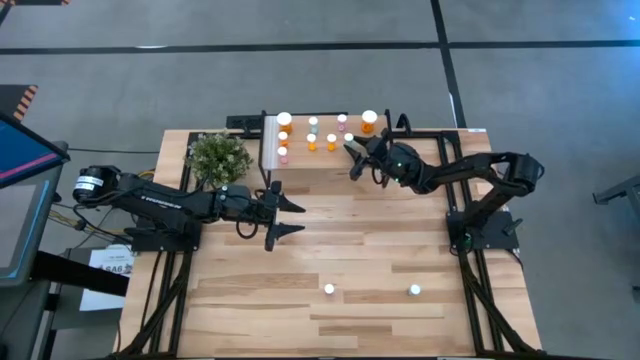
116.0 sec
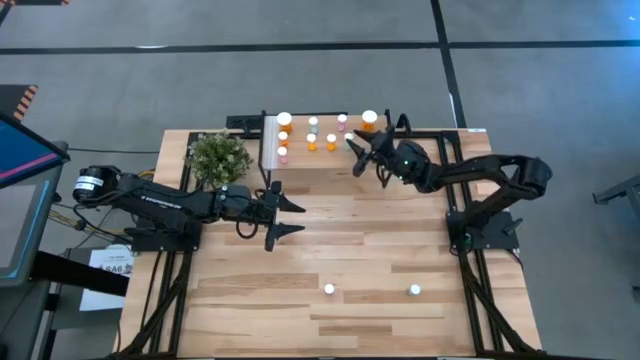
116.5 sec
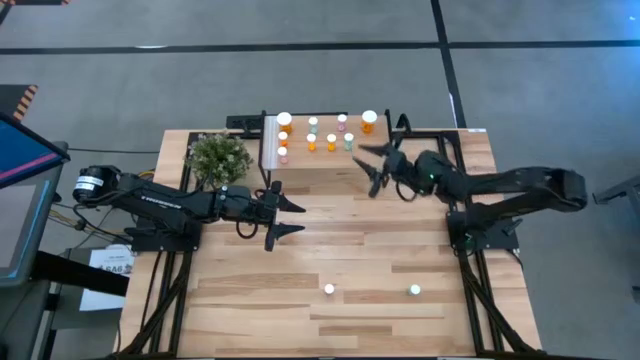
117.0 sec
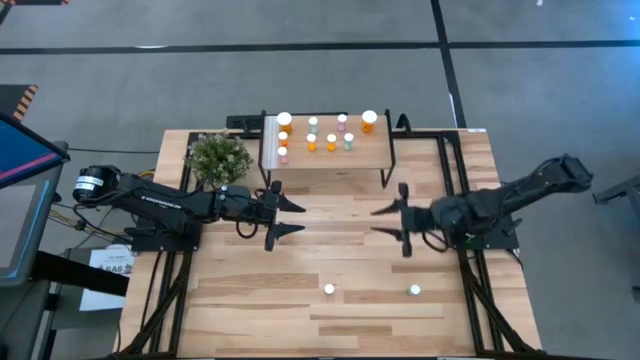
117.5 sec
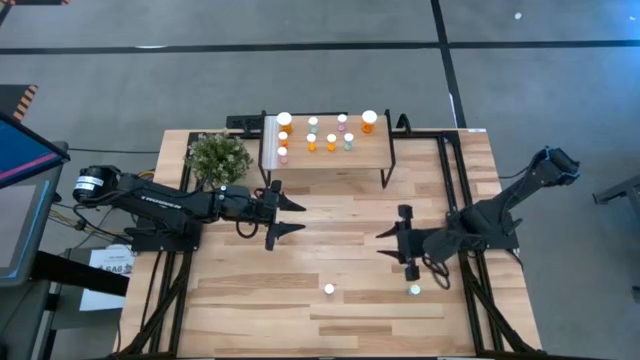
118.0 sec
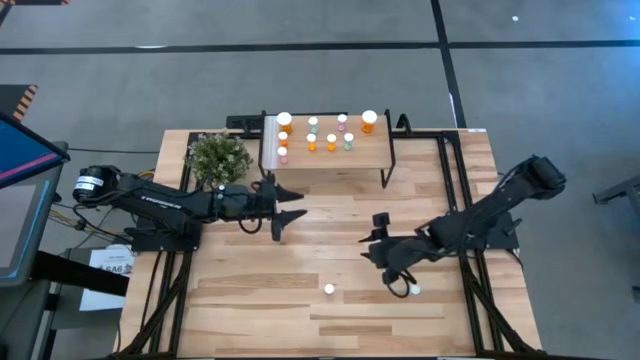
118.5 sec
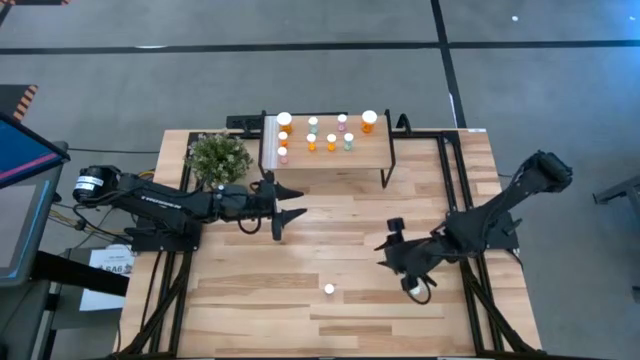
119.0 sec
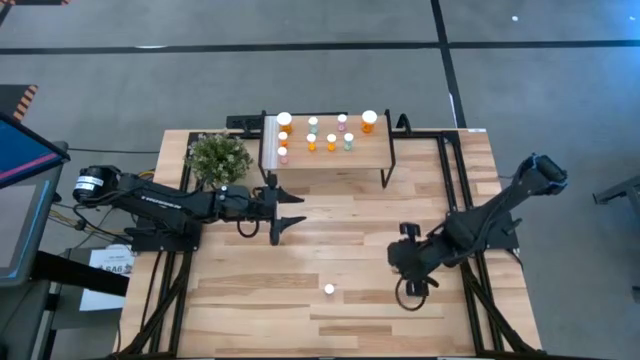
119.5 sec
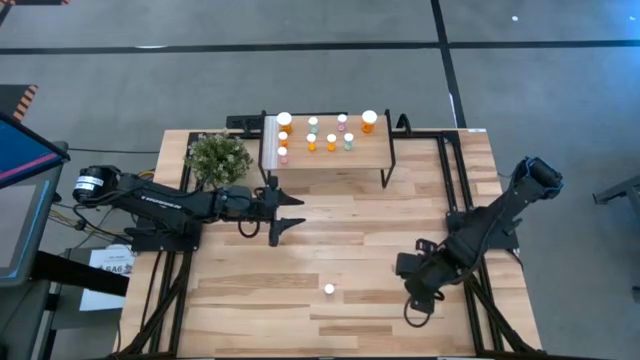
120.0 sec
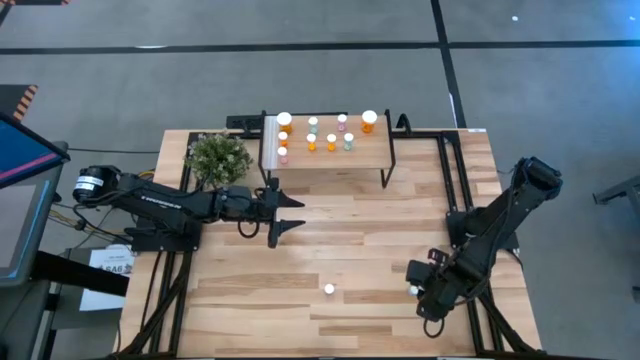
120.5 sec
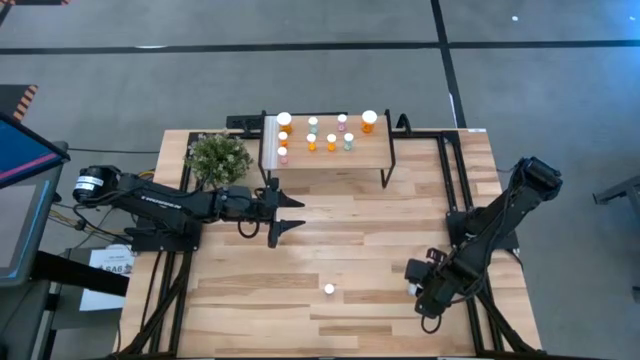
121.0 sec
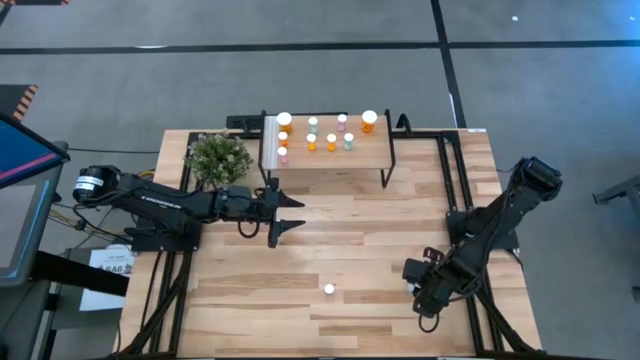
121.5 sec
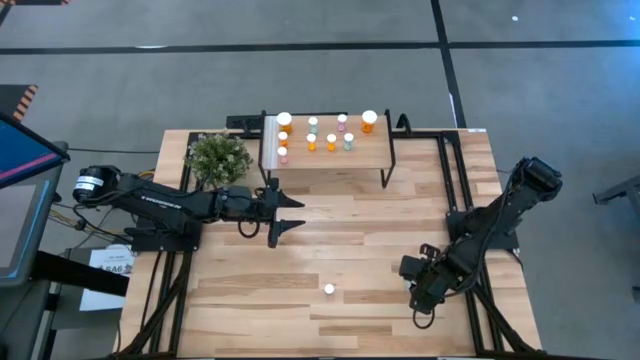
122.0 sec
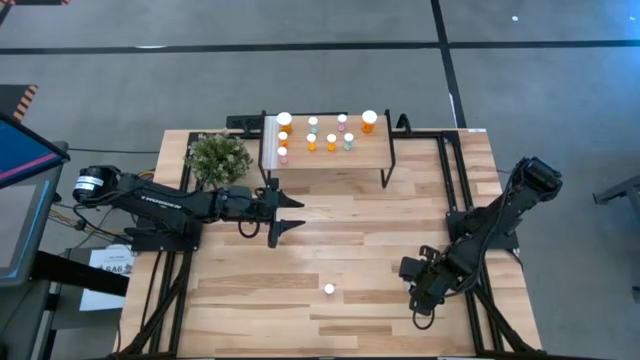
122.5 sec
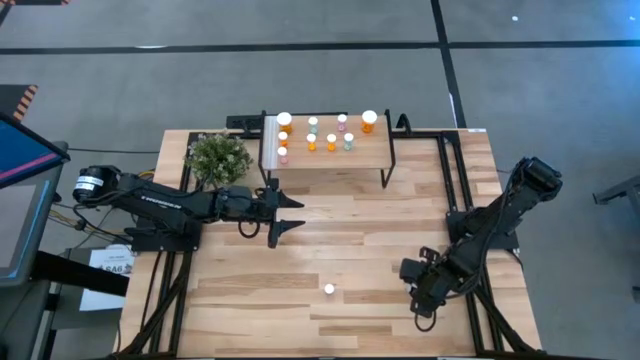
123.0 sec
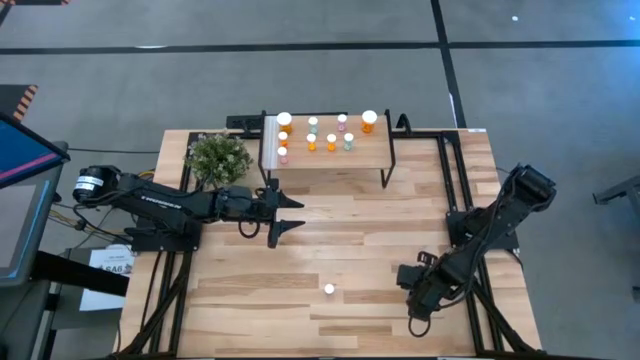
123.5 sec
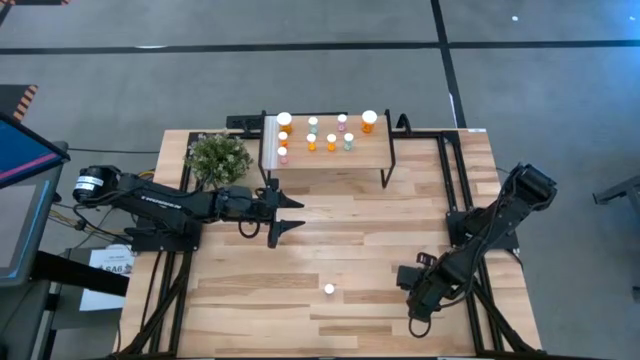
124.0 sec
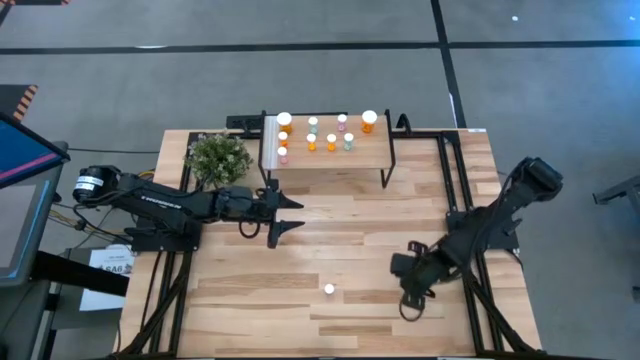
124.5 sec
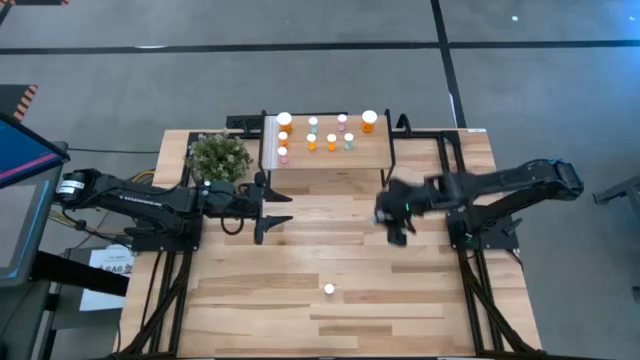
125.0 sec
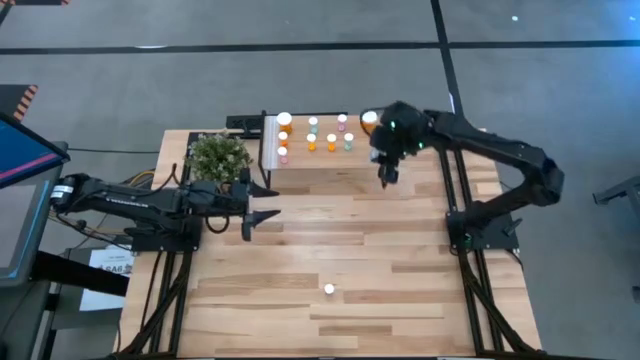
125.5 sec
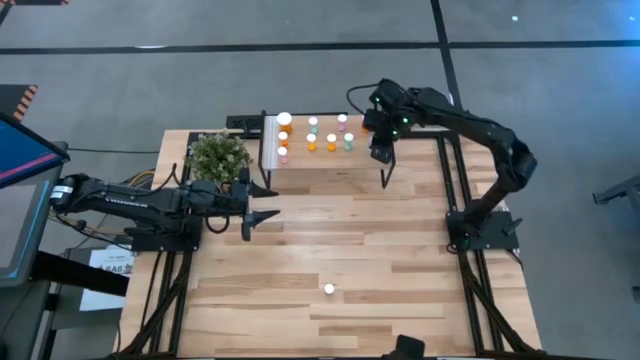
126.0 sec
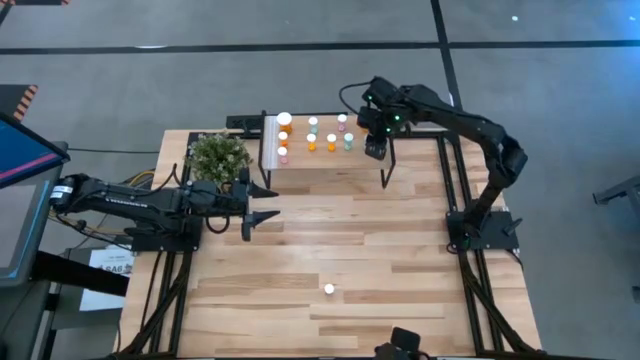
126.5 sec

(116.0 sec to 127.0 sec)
Task: Pick and place medicine bottles onto shelf by color
Put the small blue pill bottle on the shelf

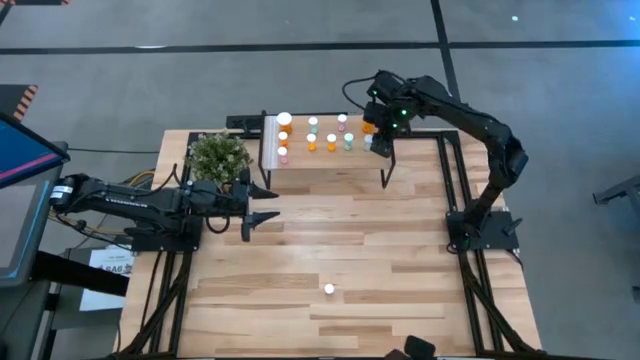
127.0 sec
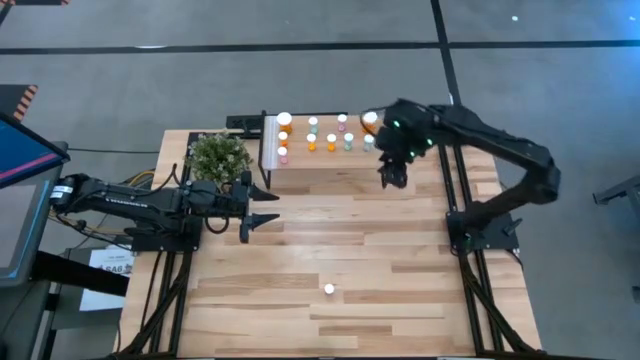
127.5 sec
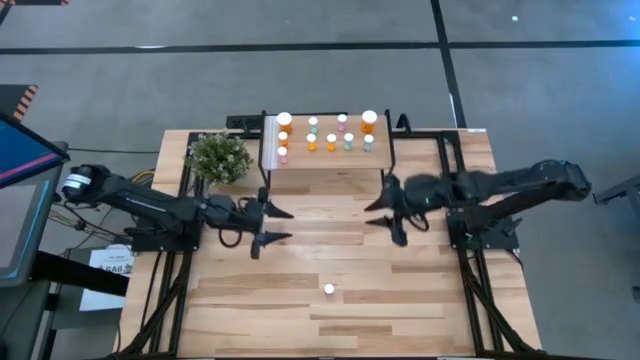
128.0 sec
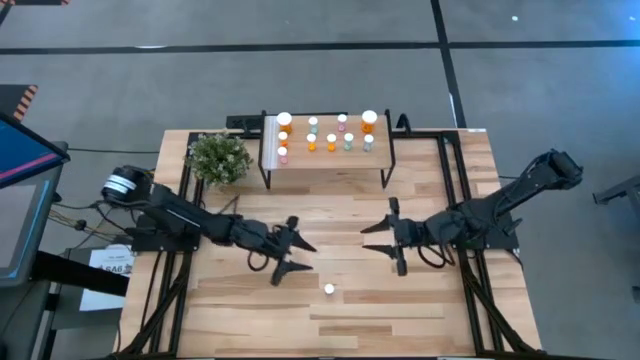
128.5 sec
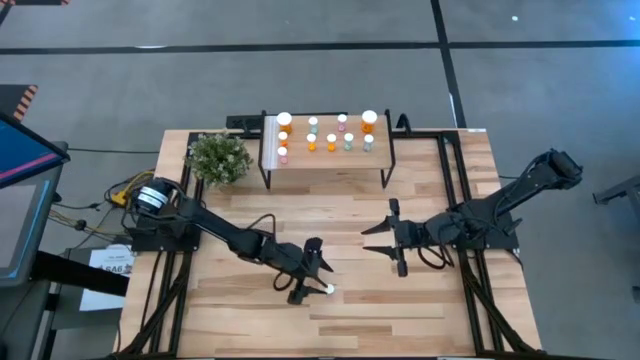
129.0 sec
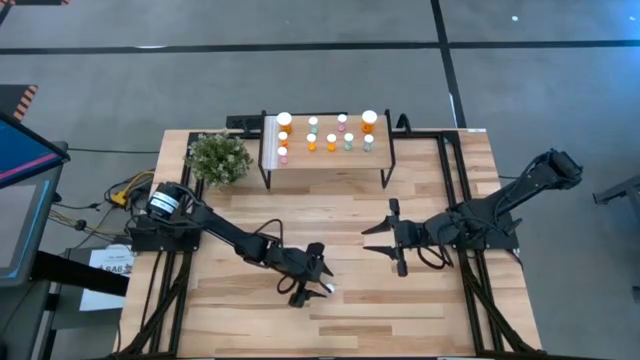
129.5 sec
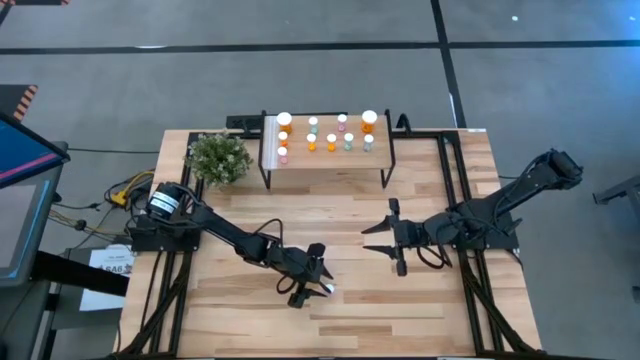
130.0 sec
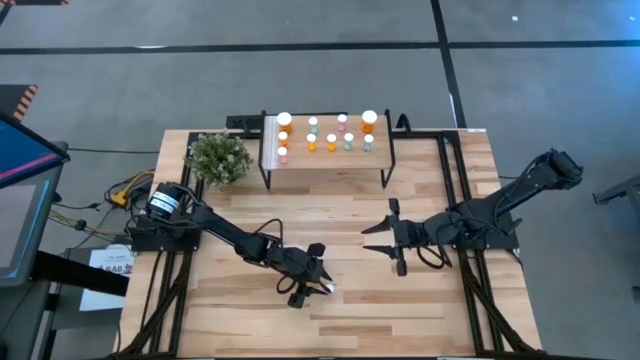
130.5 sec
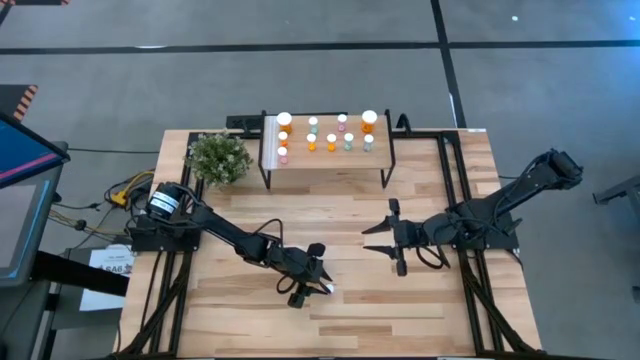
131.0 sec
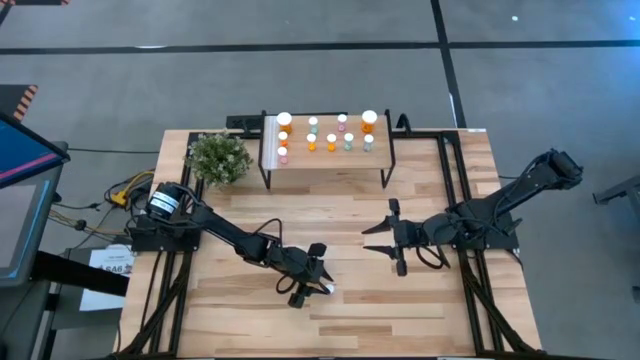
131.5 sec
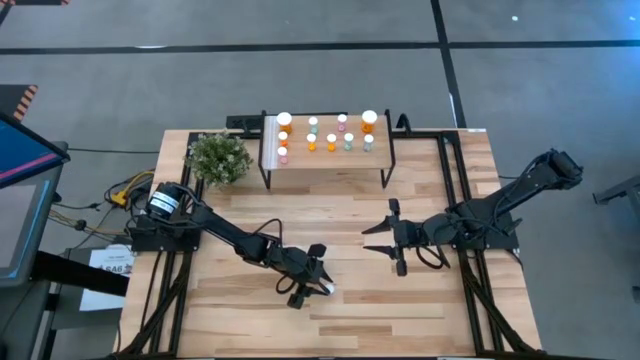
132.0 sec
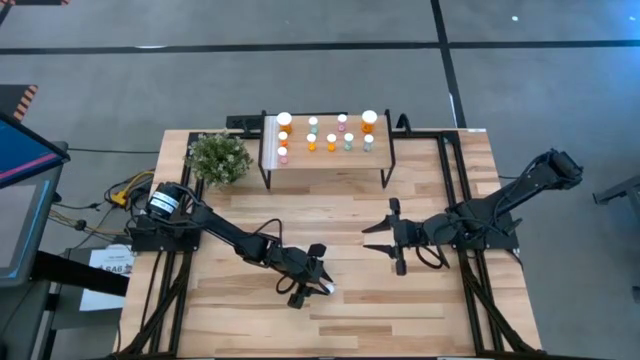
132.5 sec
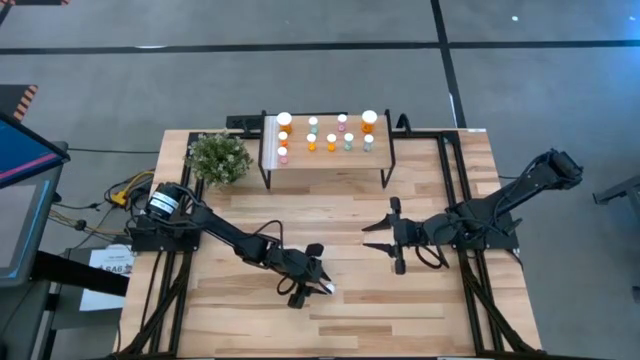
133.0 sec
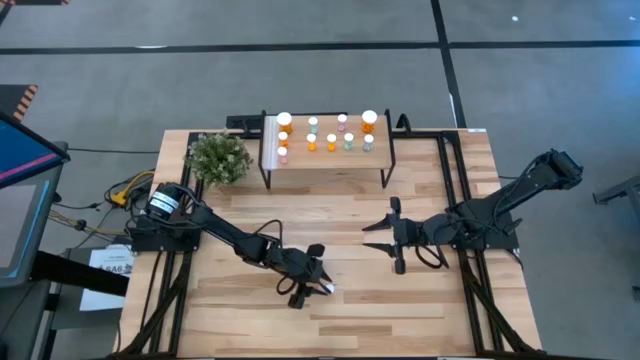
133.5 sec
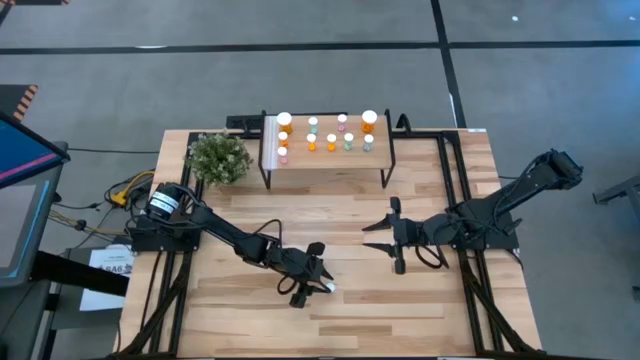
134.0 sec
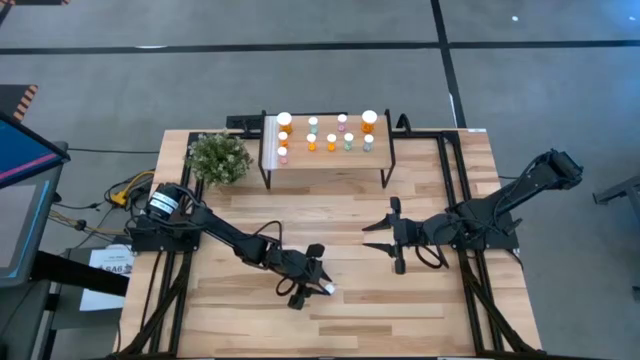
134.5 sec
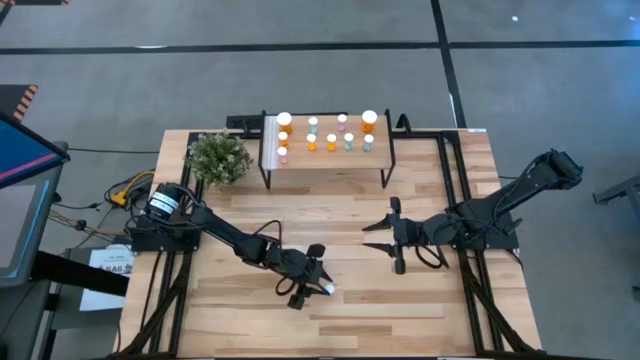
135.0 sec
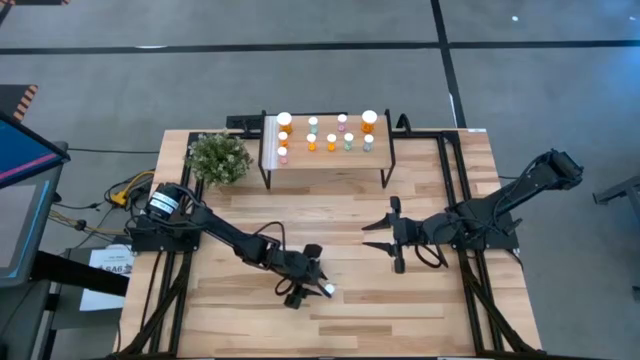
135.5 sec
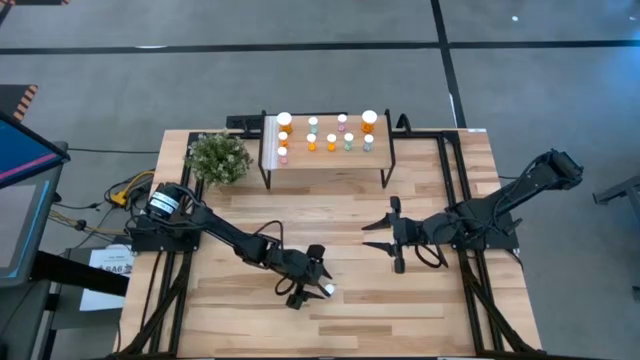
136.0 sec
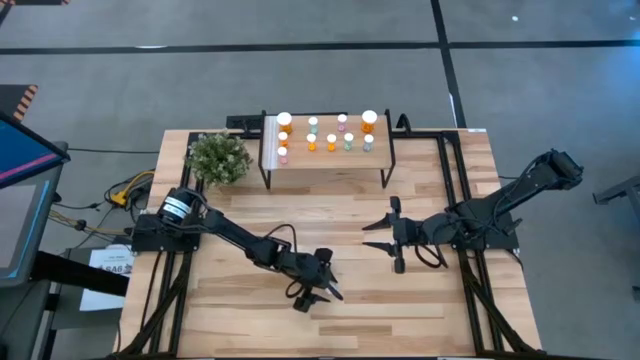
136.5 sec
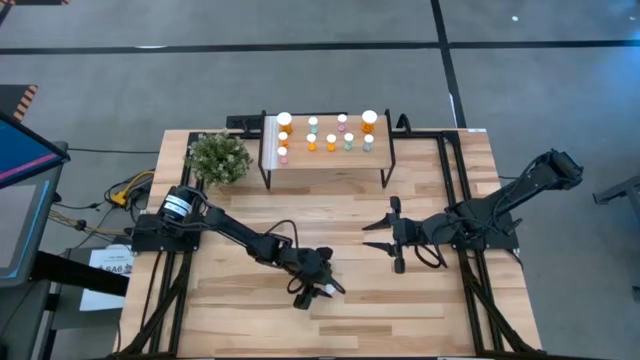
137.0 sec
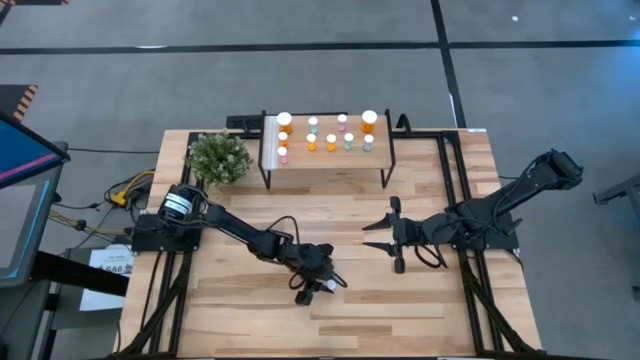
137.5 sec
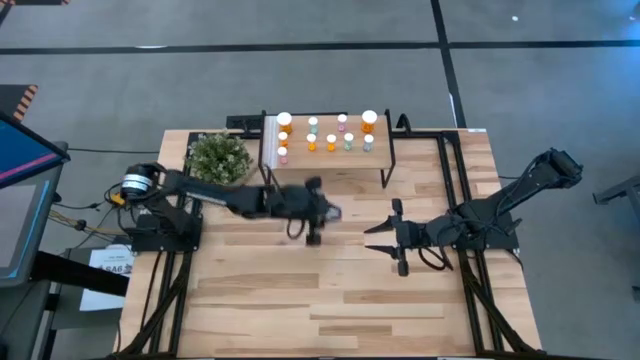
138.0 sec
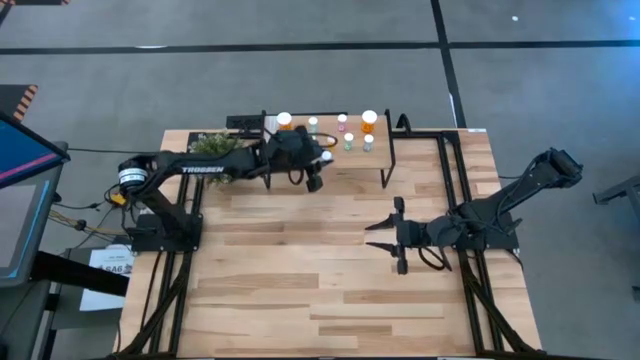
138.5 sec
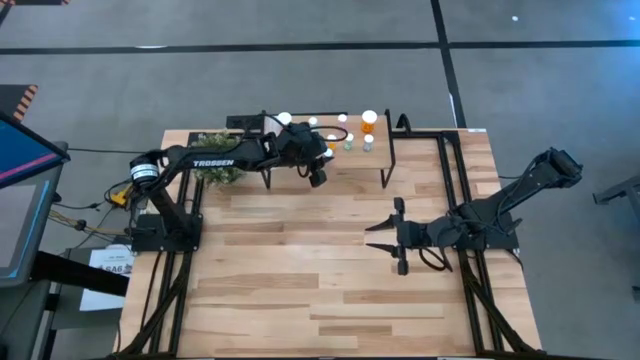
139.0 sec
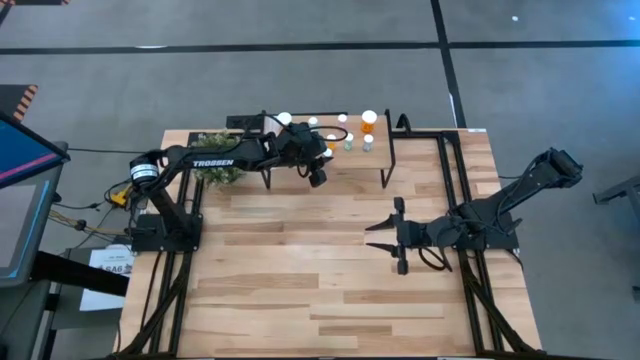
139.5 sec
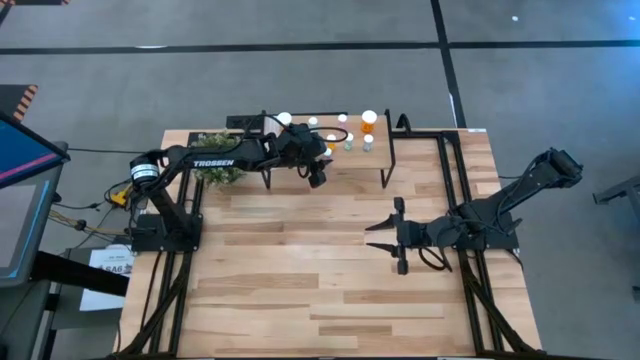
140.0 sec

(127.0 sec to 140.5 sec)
Put the small pink pill bottle on the shelf
